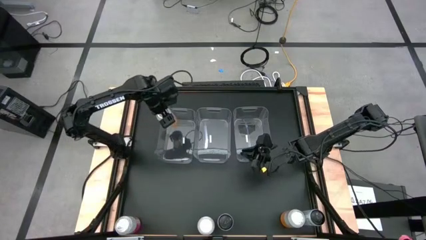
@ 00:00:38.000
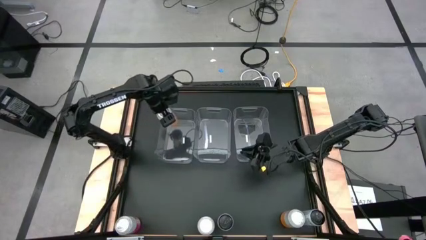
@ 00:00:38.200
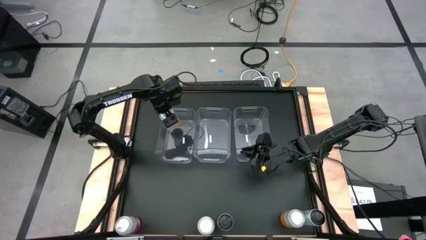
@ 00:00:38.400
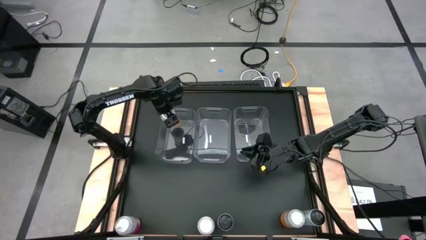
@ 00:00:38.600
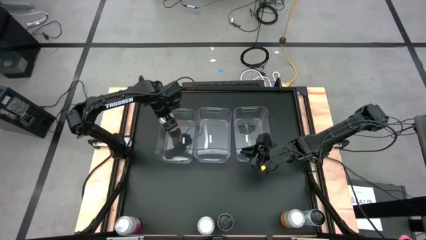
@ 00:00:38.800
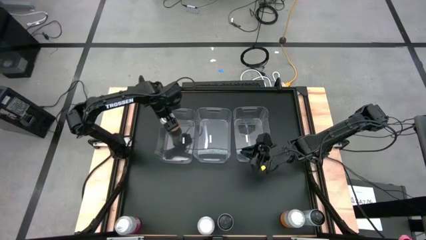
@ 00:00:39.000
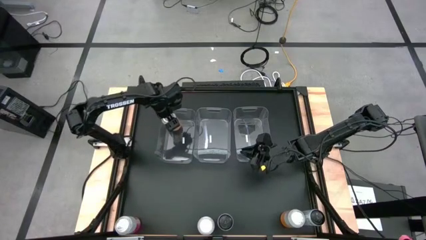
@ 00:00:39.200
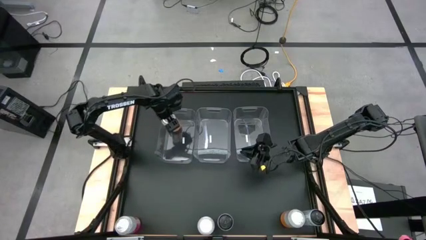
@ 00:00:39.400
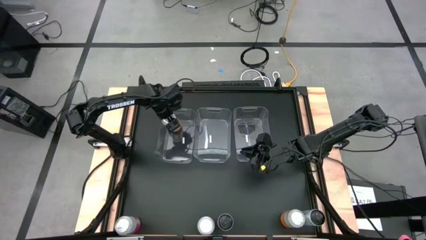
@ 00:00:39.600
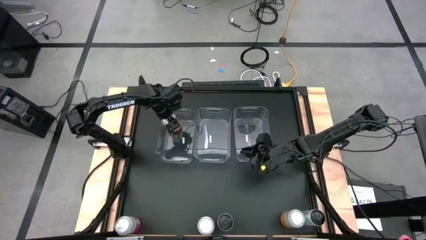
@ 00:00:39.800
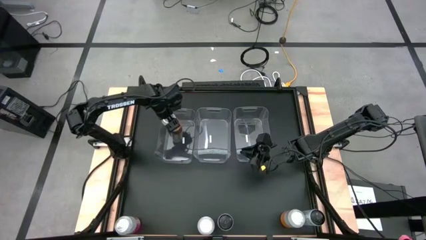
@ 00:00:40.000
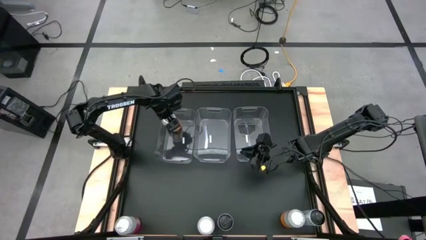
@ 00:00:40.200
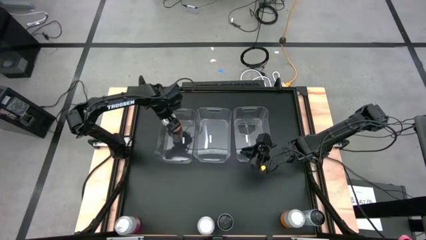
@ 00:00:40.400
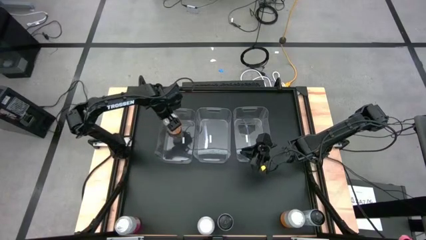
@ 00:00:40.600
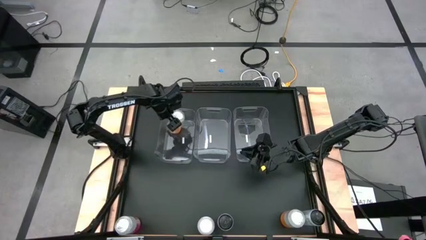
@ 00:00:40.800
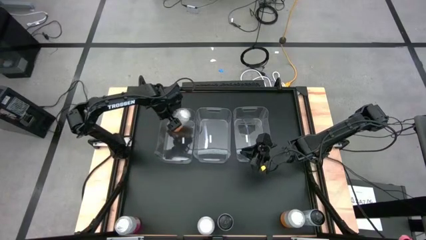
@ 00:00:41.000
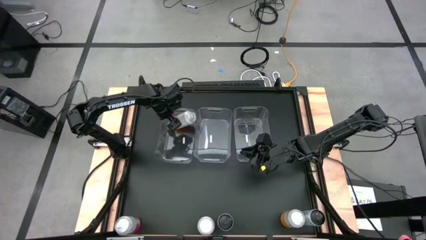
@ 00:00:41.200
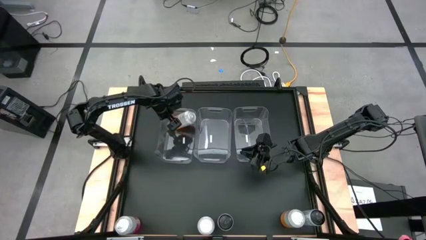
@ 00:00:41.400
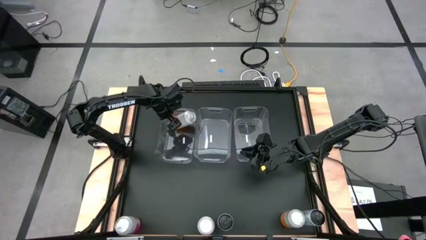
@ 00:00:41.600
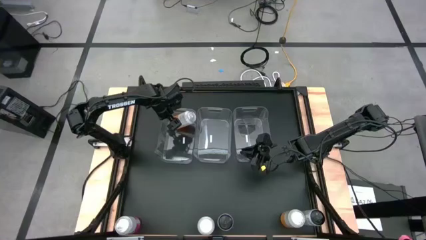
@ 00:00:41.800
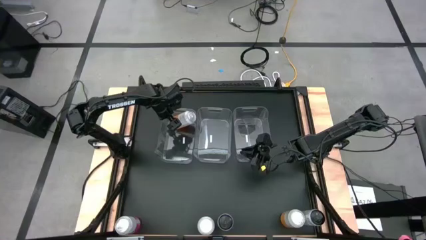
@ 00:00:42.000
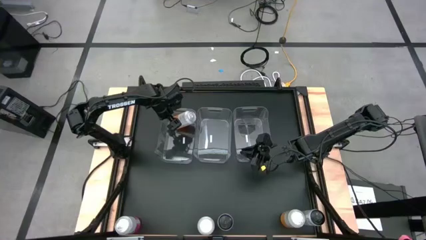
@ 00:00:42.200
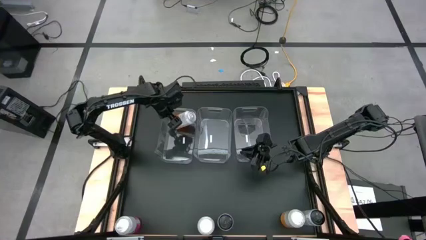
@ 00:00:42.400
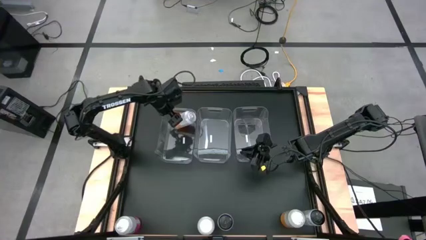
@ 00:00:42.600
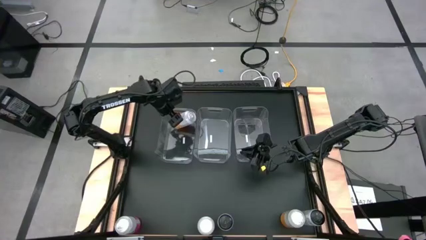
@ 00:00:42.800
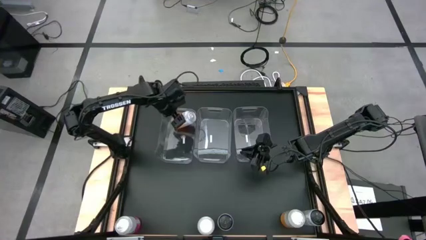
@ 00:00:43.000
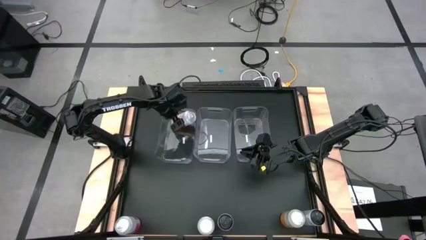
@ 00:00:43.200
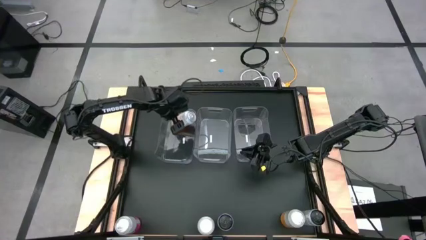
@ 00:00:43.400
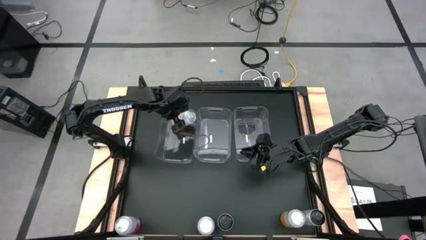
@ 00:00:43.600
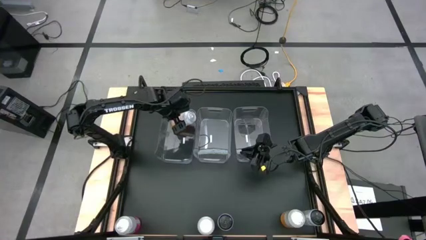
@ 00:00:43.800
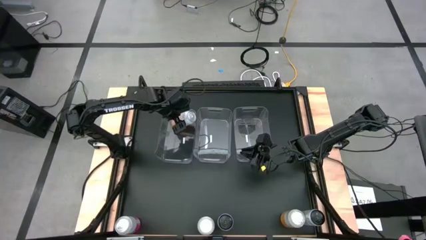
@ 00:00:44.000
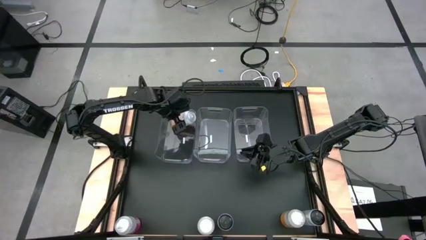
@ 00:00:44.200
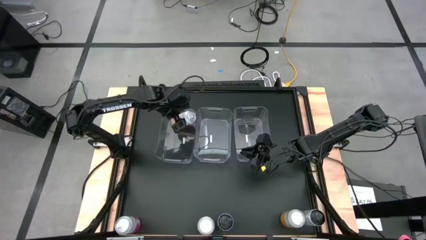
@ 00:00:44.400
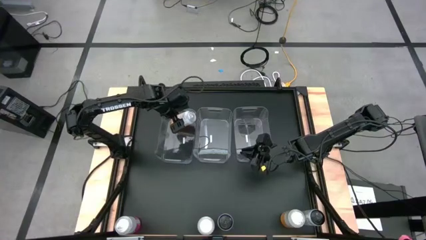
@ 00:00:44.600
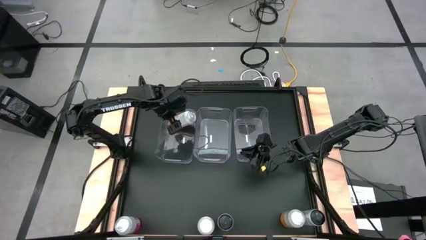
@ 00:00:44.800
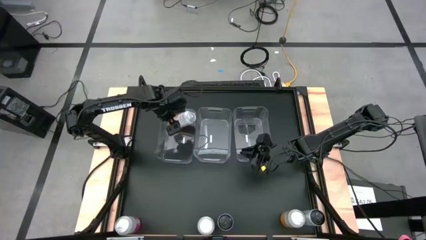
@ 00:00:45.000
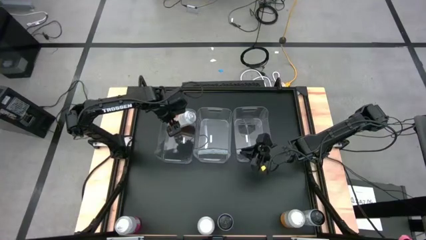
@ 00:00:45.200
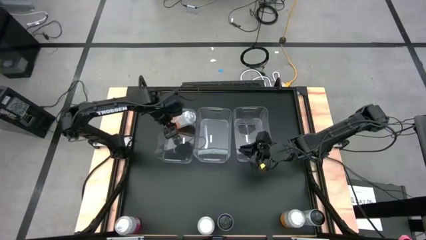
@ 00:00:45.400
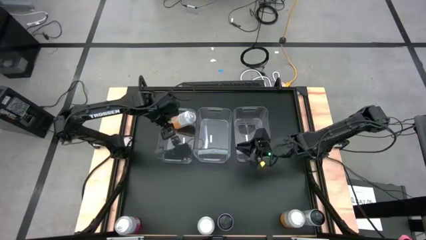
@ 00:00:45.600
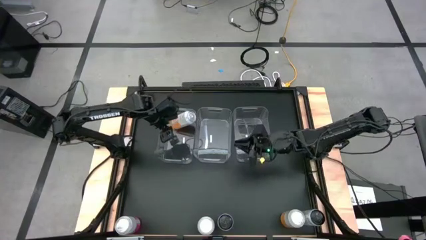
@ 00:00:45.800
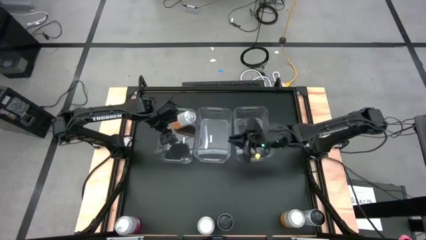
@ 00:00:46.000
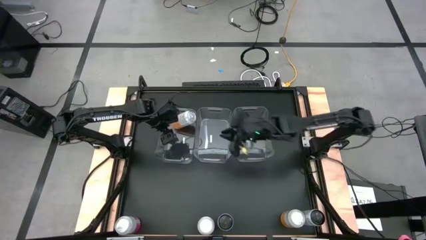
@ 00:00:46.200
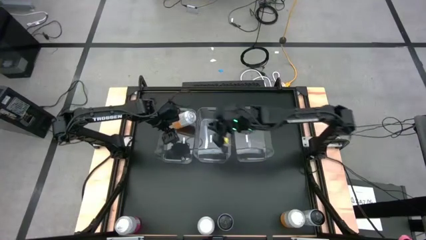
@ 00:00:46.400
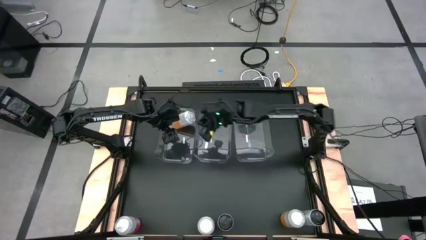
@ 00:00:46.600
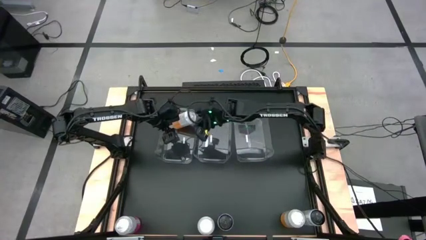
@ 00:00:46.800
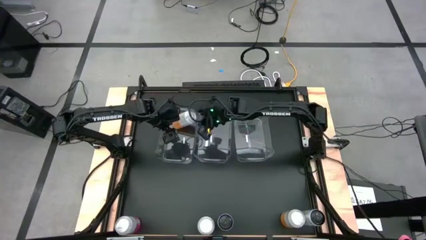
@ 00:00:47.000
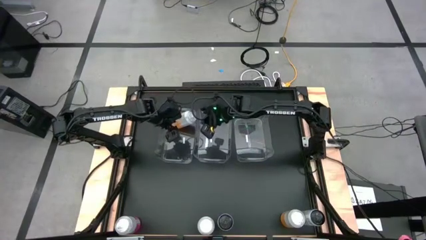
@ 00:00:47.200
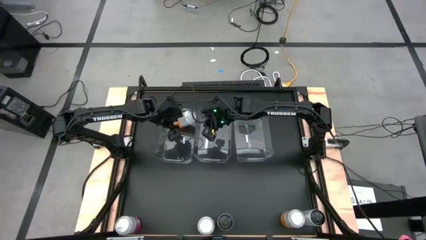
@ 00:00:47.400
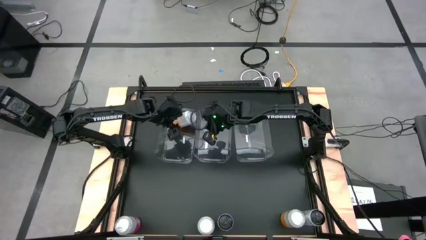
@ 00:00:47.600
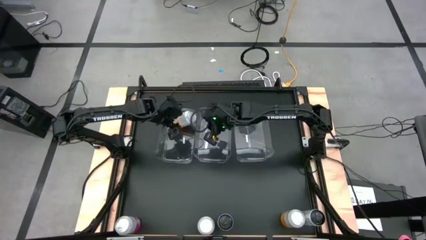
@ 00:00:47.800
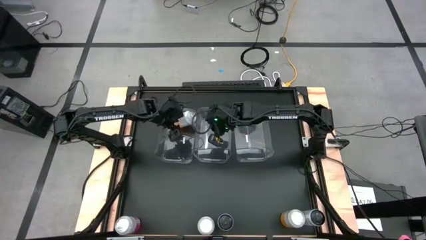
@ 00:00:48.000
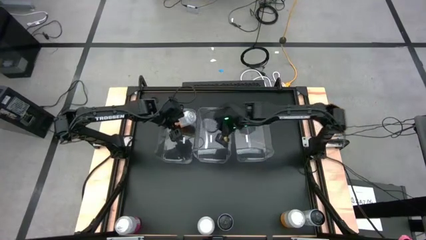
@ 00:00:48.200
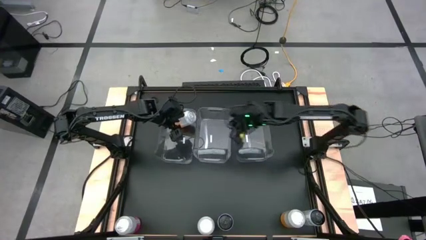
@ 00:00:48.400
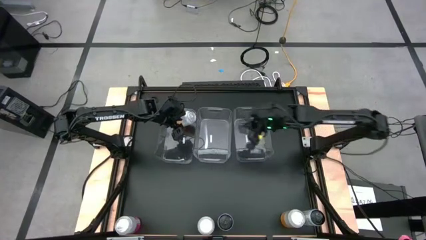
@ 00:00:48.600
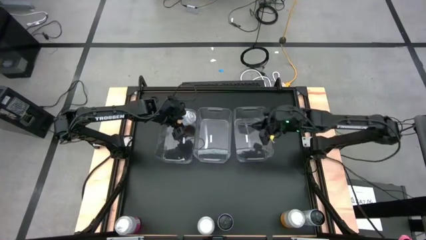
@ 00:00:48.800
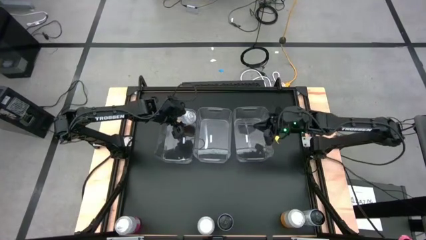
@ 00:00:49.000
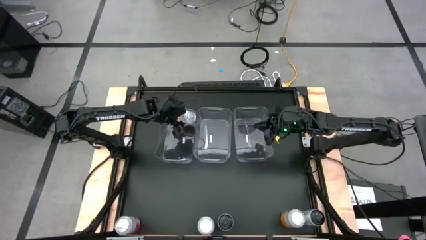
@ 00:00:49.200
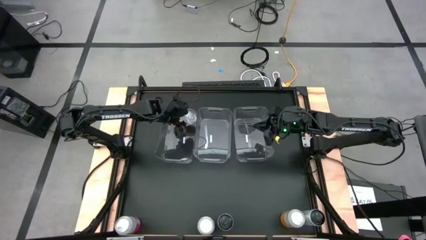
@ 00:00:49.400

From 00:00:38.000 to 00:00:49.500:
Task: Sort soda cans
Put the left yellow-white soda can into the left transparent bin

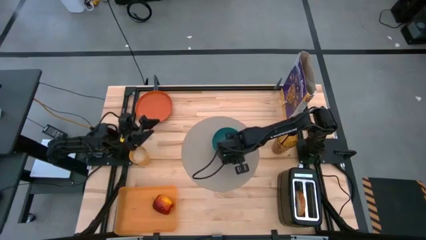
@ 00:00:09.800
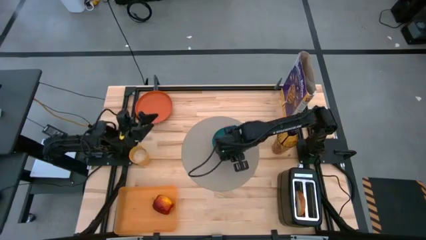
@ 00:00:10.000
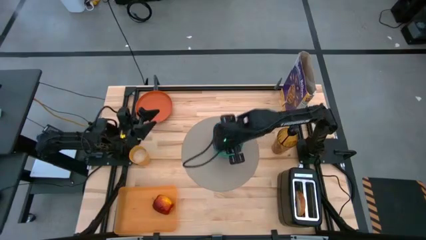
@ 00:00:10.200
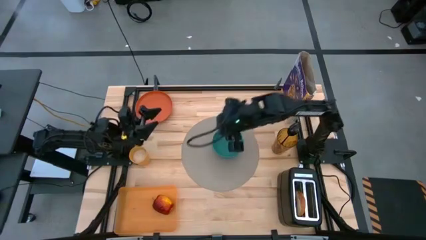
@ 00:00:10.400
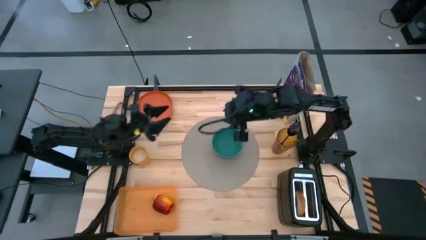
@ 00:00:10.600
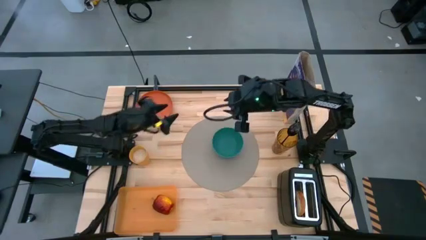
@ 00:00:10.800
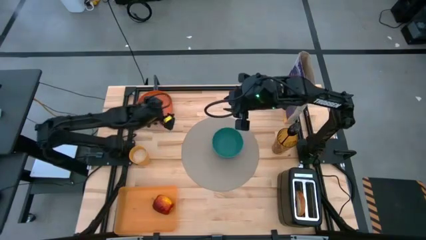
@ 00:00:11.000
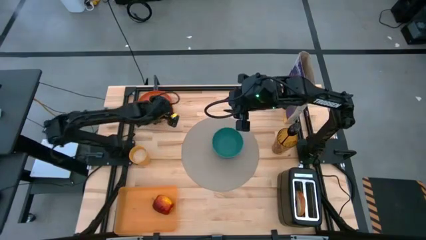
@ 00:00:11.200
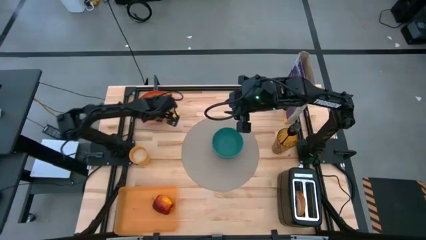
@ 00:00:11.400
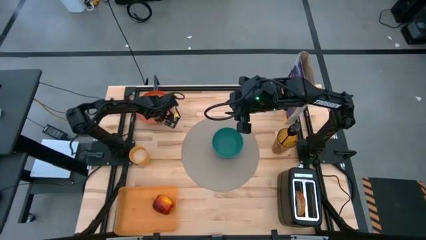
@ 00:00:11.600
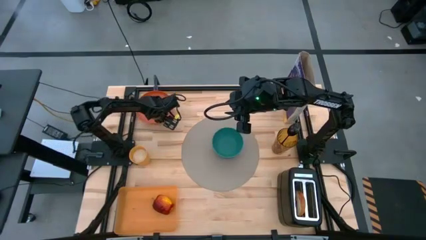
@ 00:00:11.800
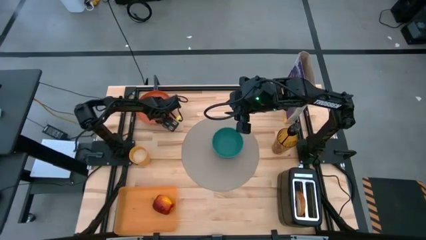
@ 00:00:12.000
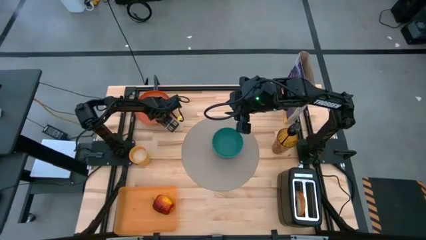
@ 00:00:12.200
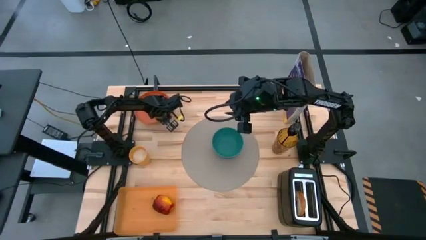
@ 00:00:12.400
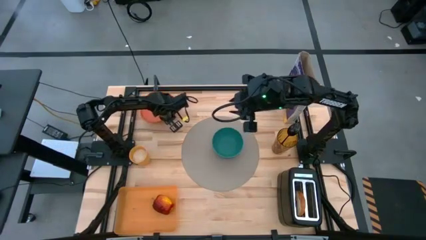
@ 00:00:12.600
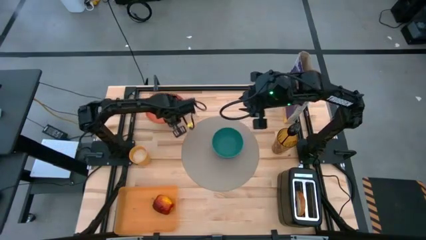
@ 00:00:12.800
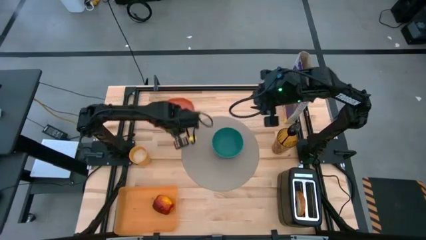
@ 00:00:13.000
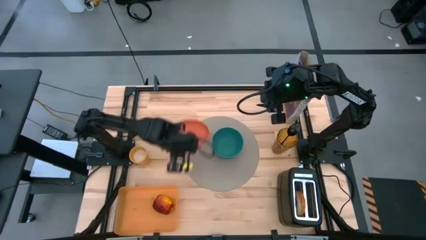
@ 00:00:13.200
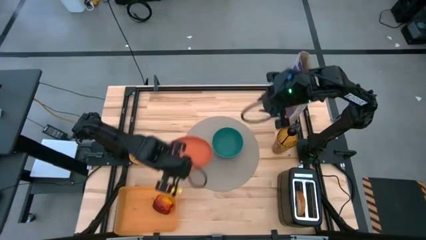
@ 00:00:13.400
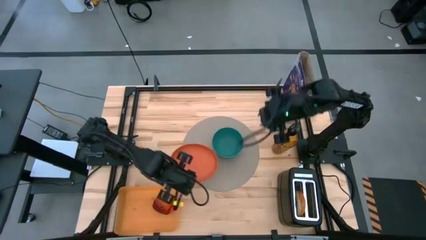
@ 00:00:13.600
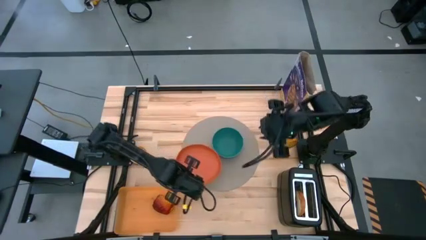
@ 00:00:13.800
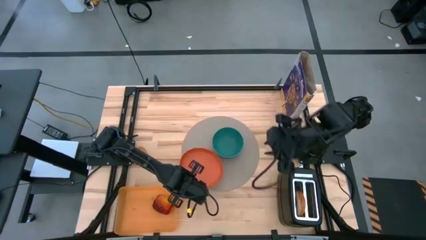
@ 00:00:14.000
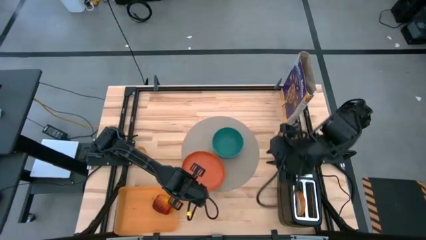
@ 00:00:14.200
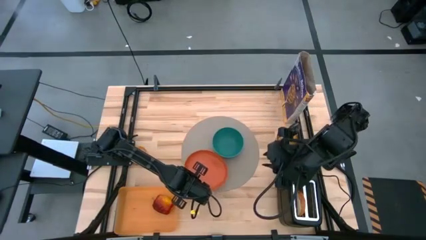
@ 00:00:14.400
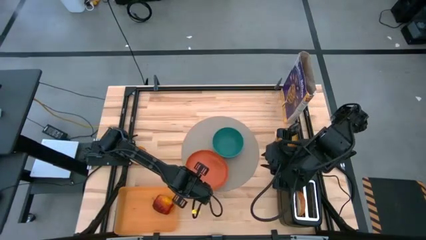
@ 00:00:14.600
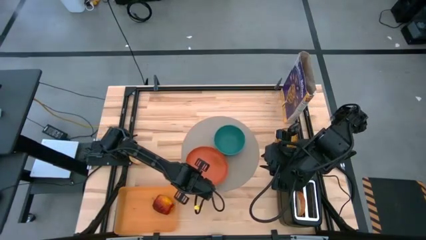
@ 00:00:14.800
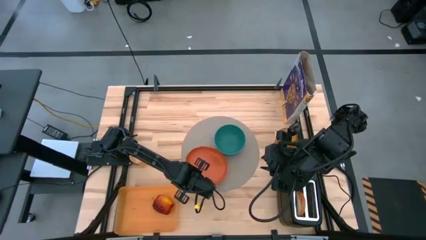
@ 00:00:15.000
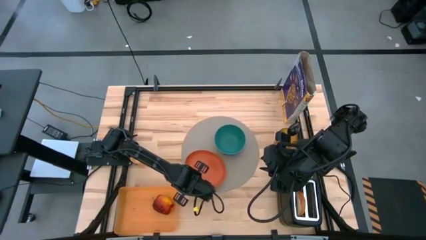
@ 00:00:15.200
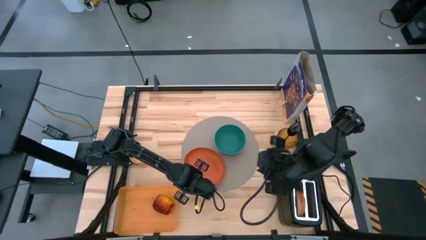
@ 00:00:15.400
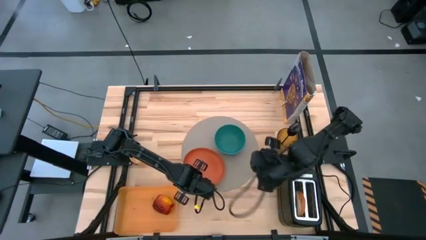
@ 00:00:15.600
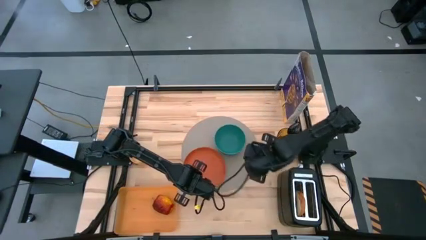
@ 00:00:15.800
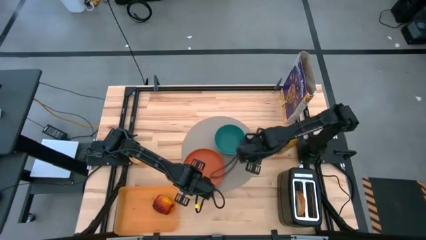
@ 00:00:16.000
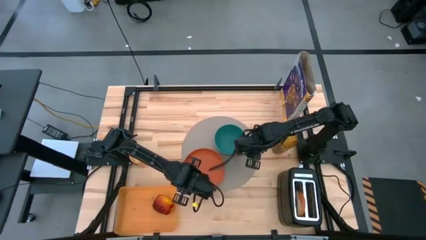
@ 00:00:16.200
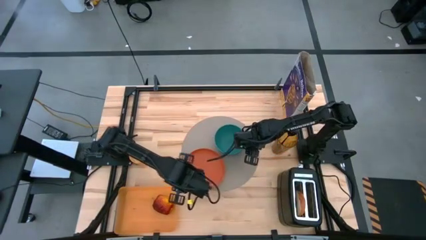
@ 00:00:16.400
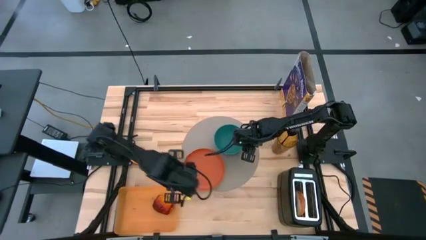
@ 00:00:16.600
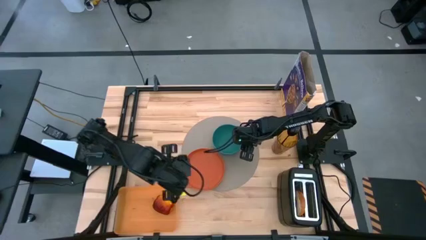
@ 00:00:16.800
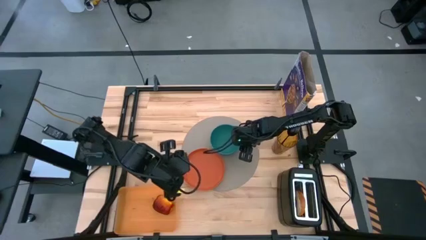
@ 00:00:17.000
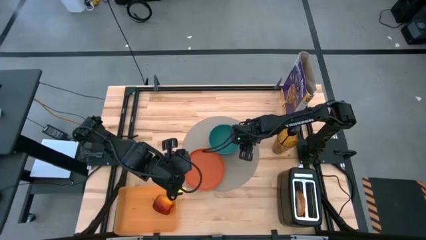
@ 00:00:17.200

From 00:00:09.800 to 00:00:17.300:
Task: Arrange a breakfast setting
Put the orange plate on the placemat to the bottom of the blue bowl
